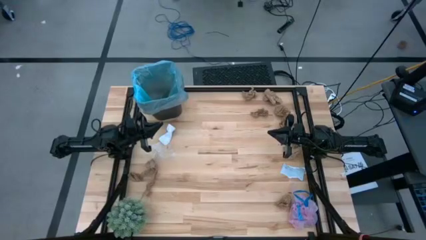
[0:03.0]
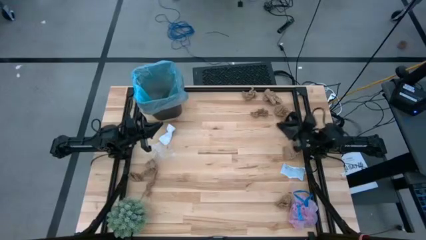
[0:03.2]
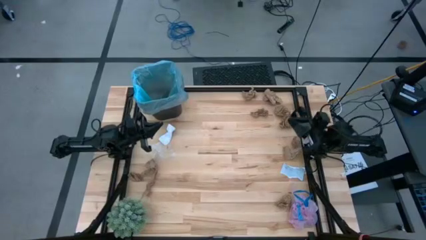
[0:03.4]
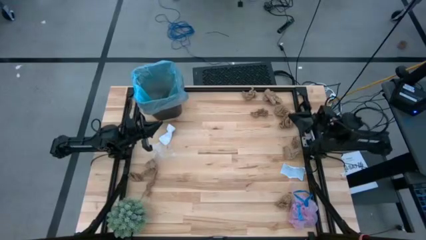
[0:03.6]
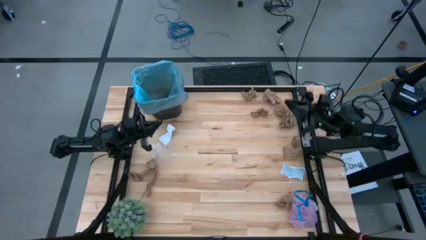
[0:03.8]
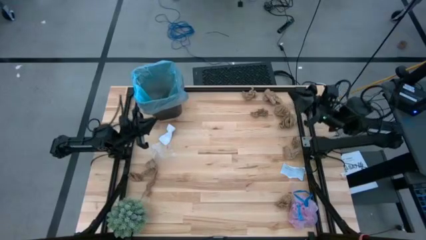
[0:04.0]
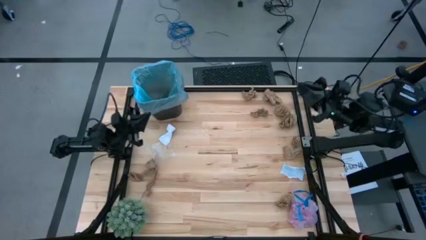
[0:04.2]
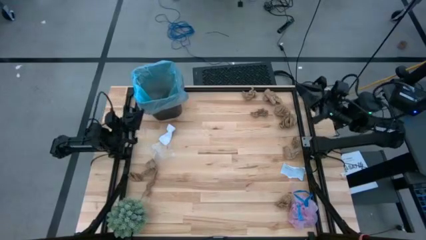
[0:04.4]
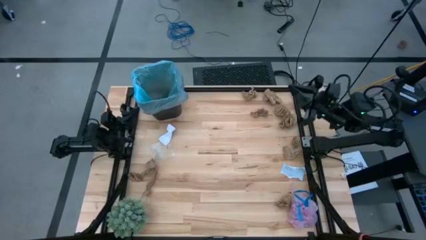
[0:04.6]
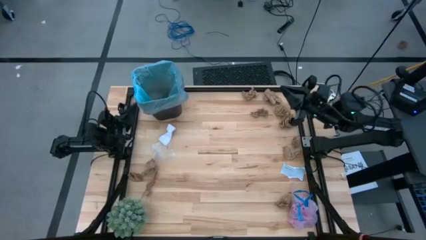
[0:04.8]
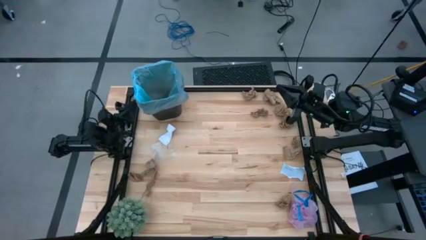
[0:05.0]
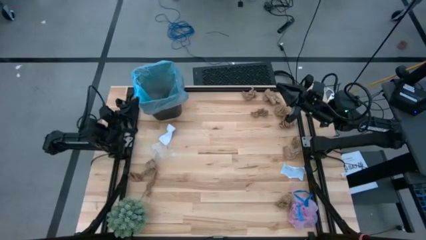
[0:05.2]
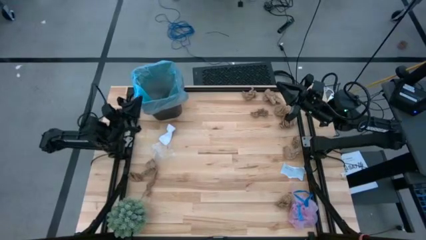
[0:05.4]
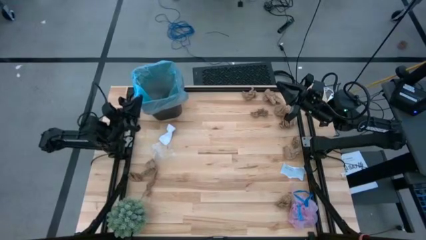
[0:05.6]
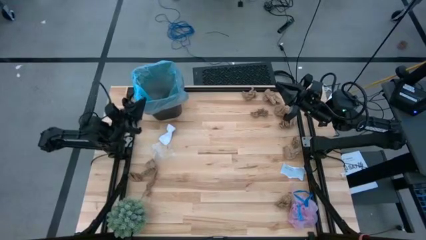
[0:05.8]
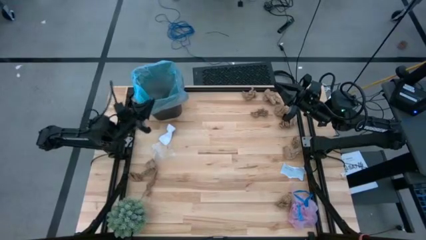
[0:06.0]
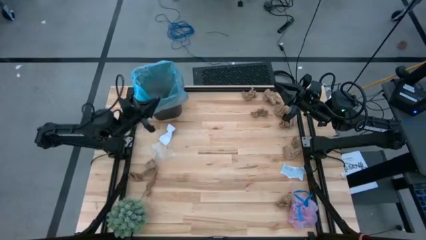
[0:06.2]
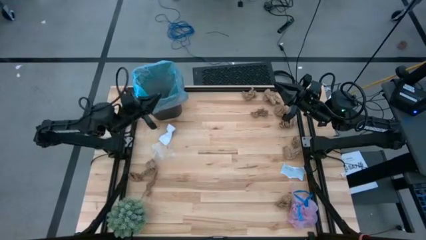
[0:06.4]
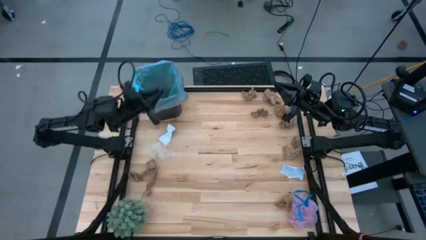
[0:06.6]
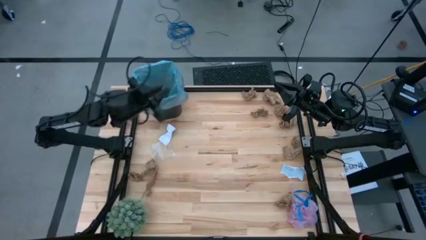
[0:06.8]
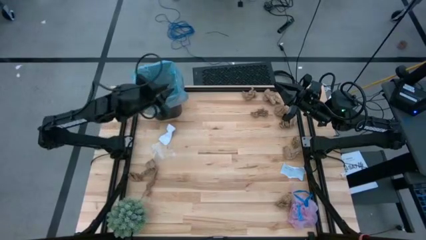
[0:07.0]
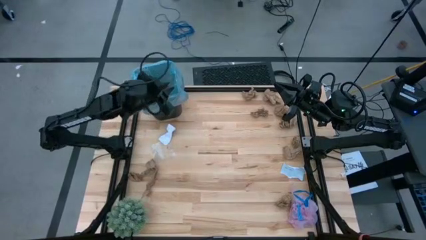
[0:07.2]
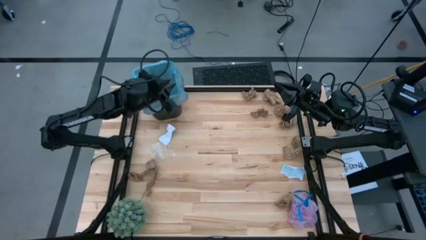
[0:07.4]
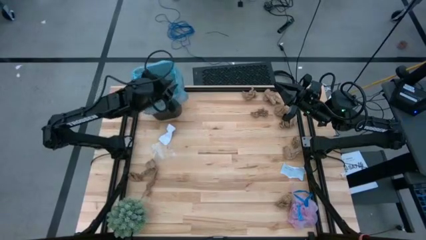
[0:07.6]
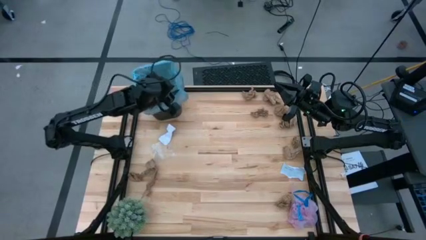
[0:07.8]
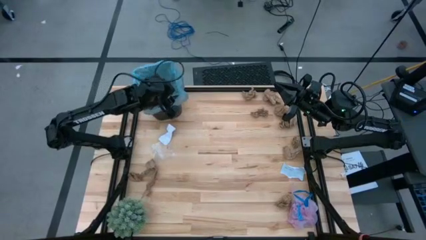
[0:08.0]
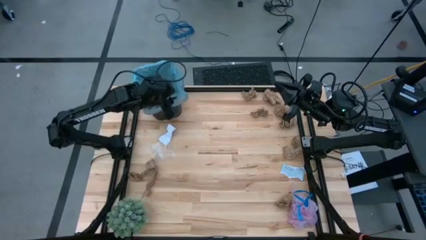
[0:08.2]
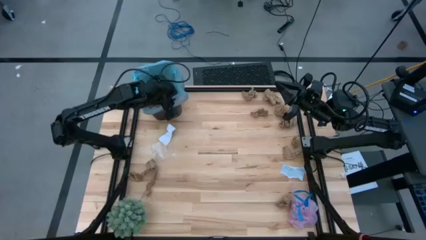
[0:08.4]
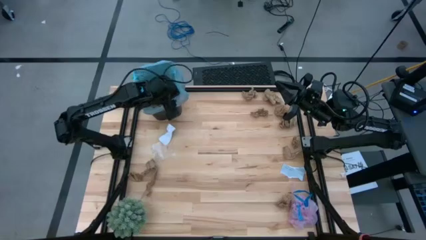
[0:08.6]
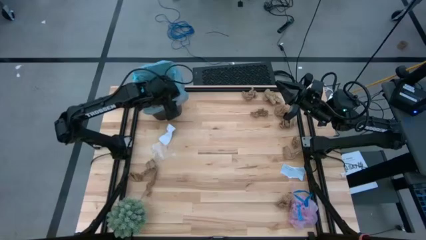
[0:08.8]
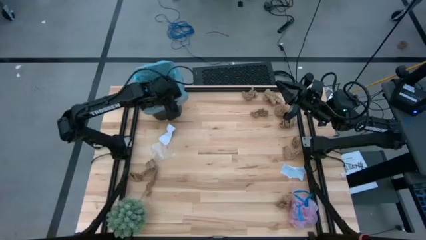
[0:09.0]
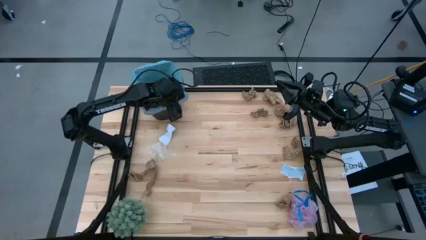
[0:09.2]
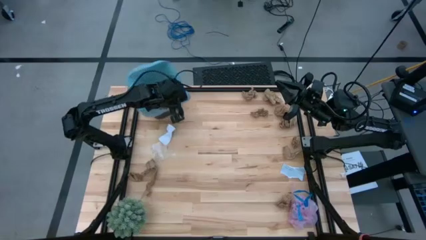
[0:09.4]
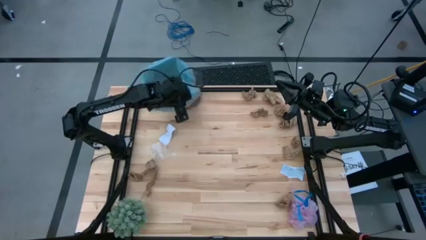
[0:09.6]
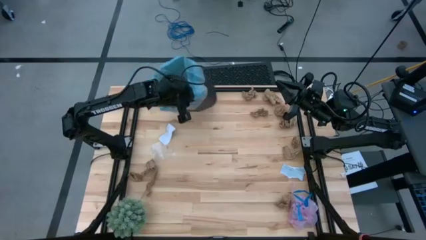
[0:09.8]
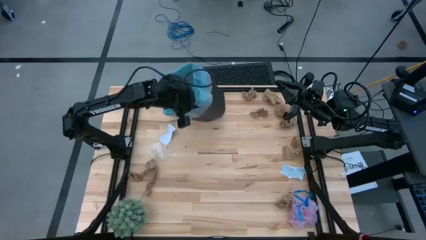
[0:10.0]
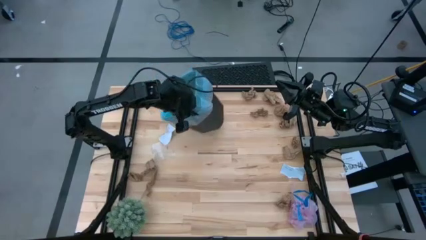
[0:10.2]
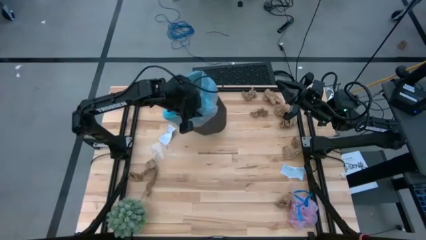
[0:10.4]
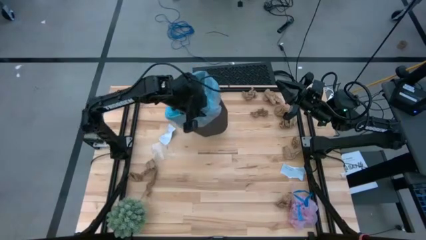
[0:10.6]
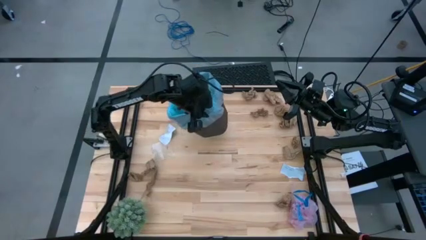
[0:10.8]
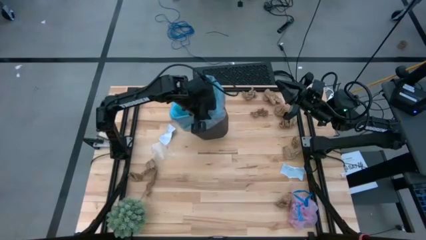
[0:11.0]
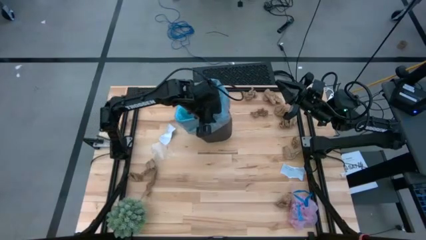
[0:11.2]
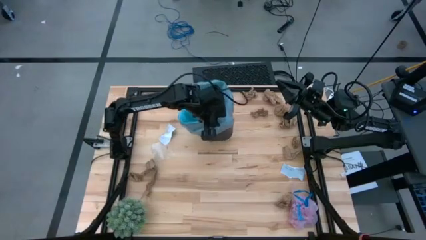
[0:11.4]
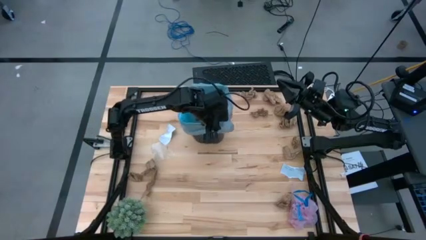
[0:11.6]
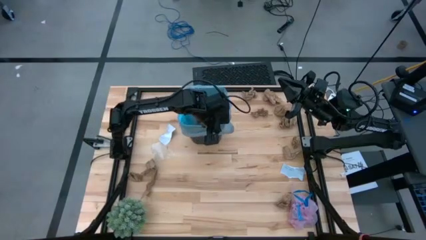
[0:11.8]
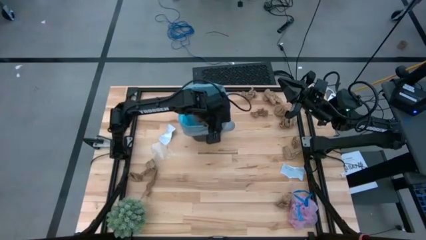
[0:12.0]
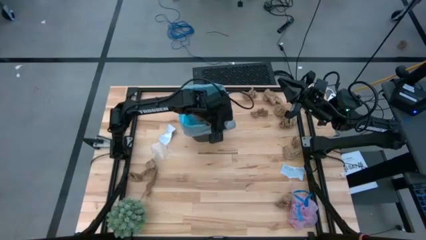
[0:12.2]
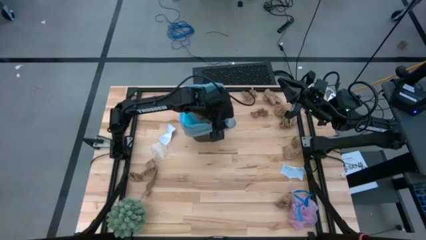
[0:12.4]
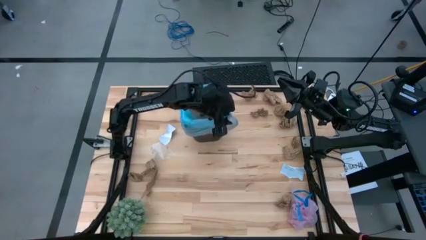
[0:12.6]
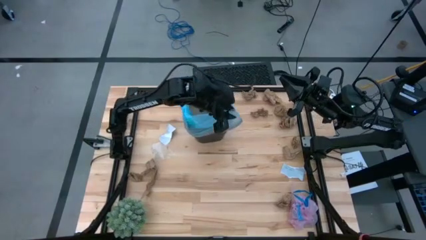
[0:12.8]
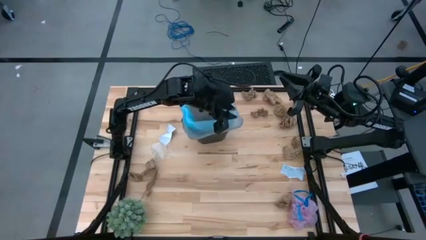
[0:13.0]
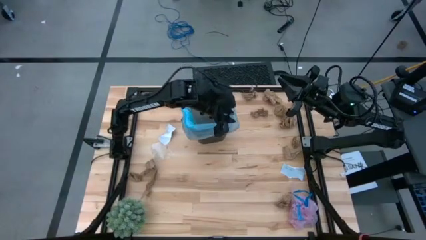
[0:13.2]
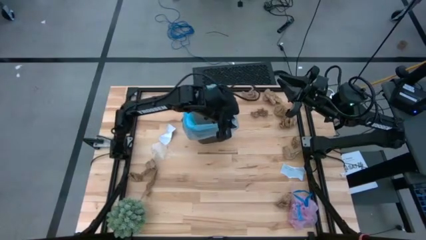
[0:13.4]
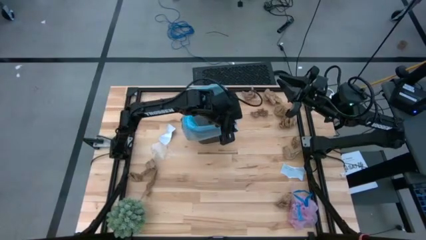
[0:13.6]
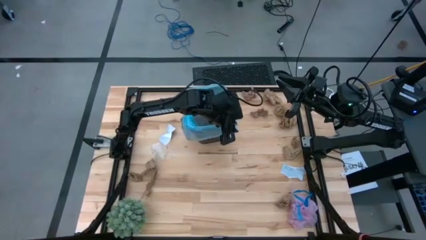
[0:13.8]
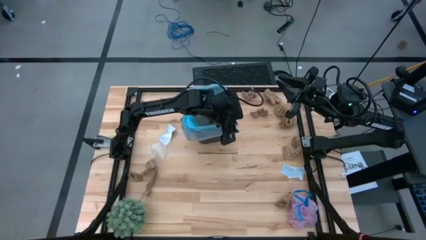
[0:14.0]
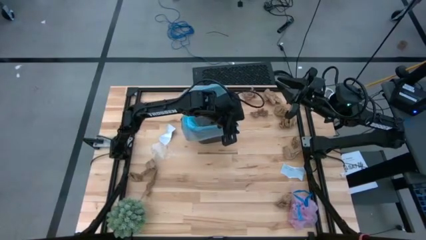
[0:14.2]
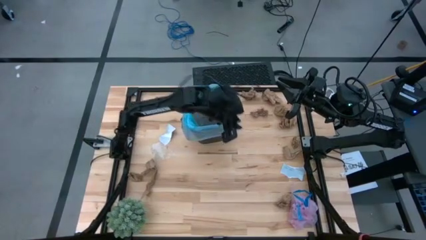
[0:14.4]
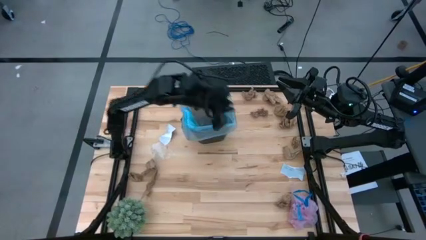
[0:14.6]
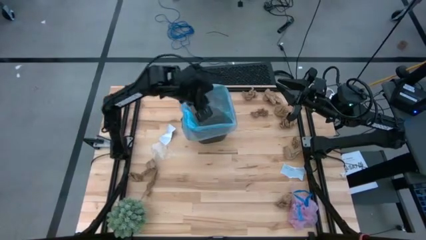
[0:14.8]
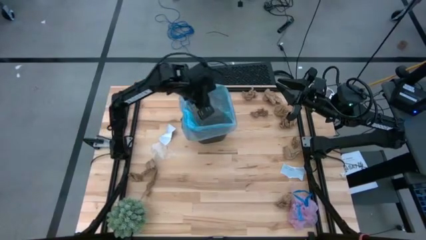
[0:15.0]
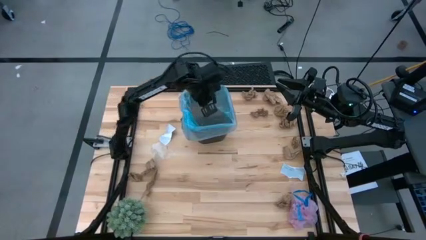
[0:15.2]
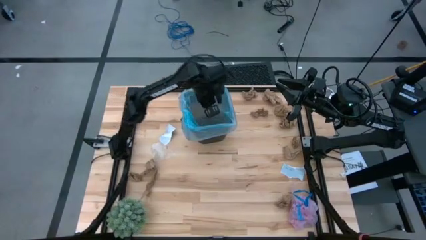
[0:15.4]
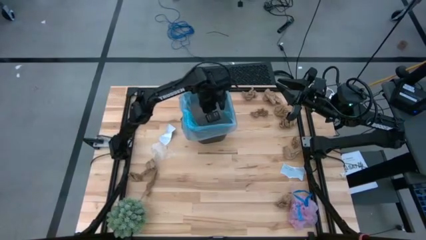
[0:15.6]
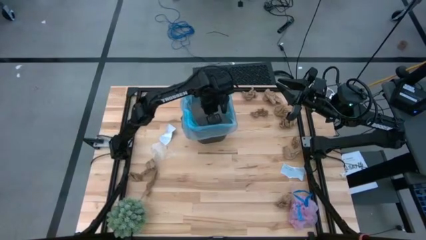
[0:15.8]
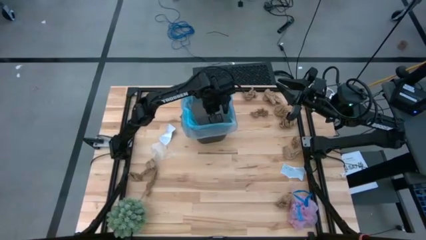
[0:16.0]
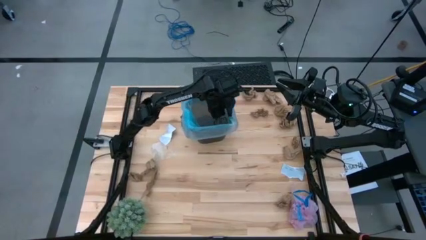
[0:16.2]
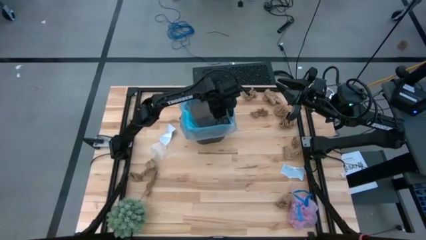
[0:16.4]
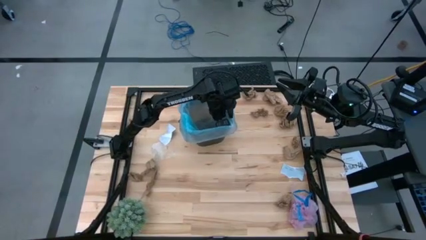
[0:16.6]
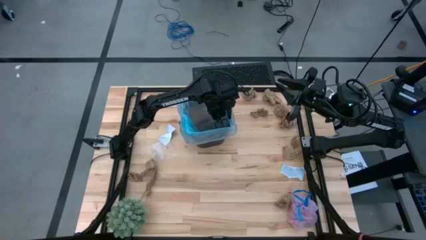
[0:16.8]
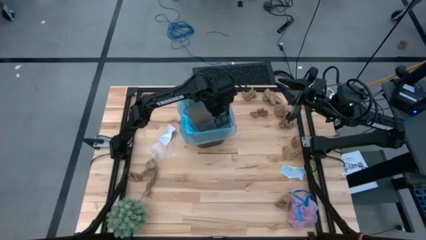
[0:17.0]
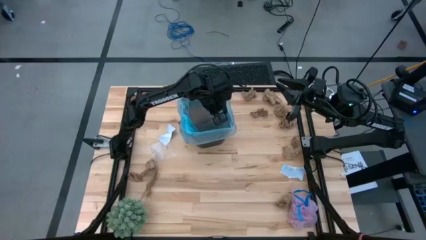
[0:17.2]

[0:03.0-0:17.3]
Task: Pick and place trash into bin
Move the brown trash bin to the top center
